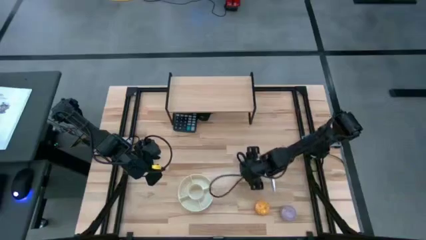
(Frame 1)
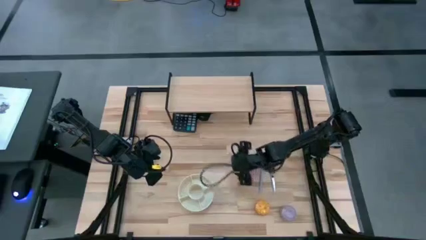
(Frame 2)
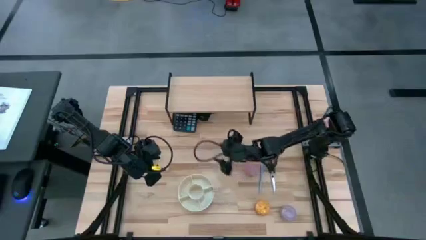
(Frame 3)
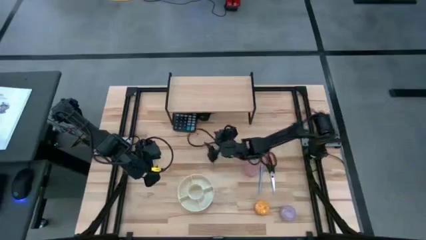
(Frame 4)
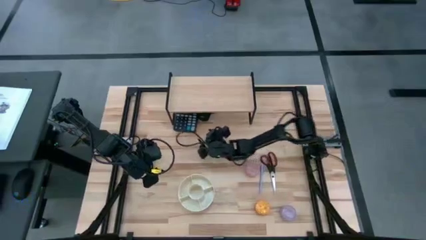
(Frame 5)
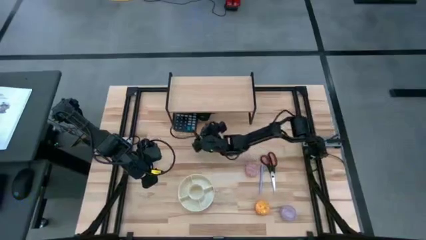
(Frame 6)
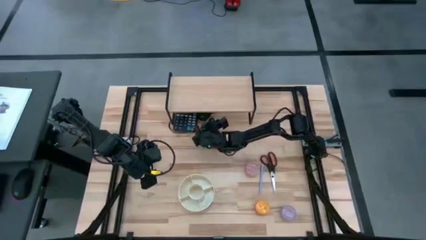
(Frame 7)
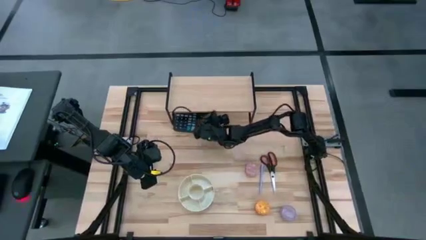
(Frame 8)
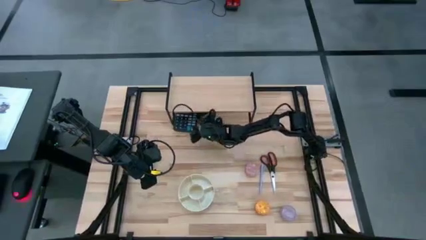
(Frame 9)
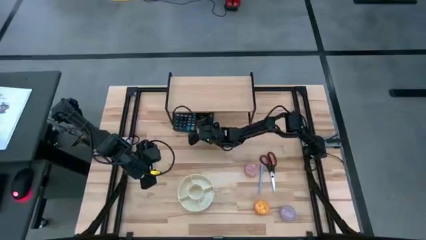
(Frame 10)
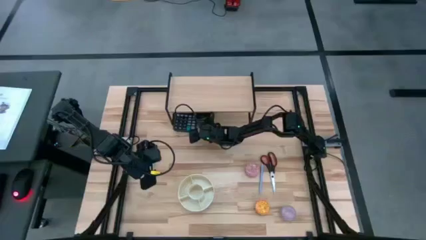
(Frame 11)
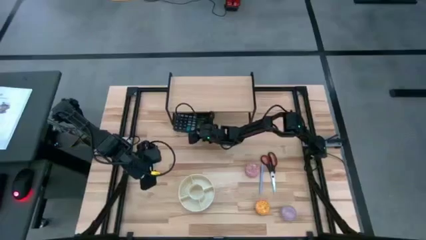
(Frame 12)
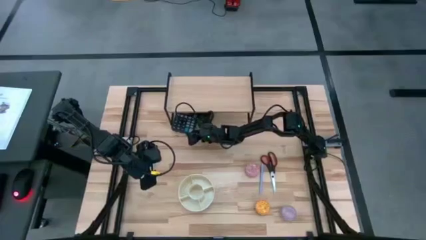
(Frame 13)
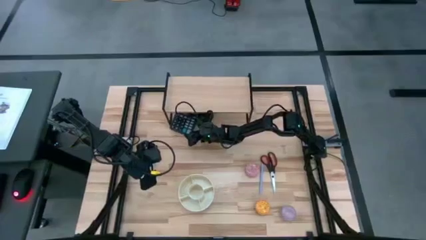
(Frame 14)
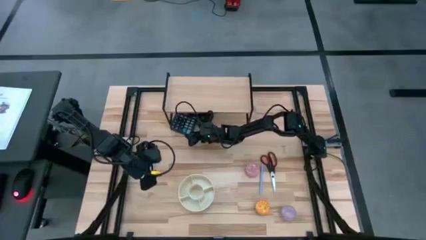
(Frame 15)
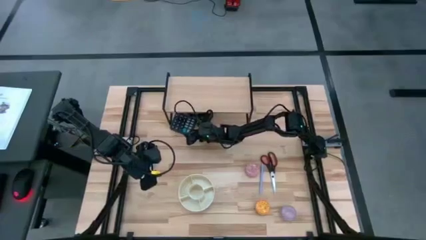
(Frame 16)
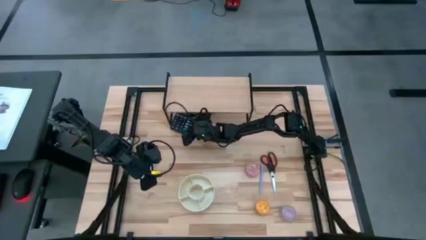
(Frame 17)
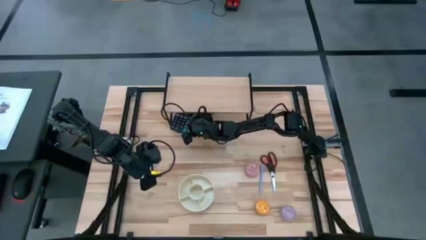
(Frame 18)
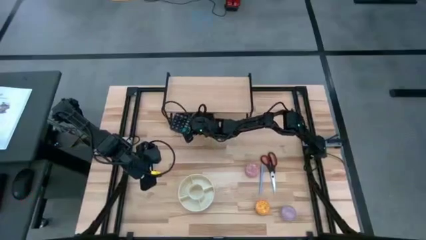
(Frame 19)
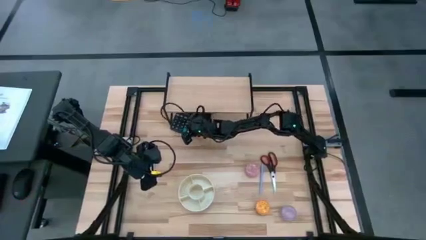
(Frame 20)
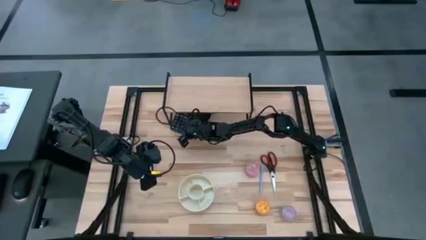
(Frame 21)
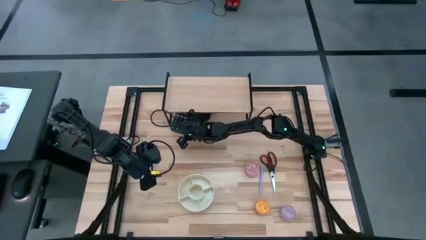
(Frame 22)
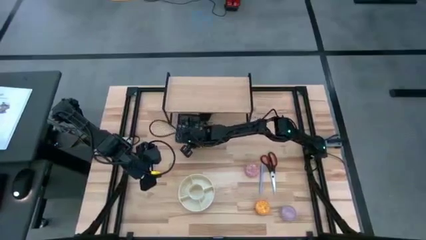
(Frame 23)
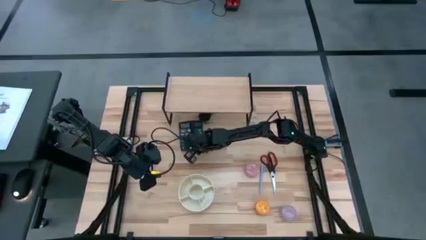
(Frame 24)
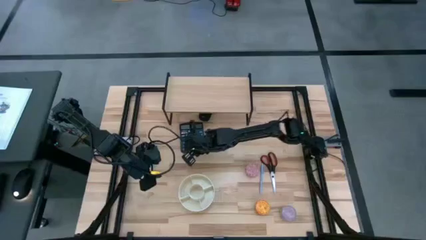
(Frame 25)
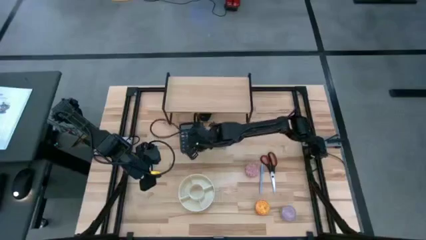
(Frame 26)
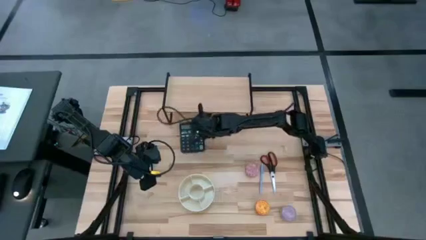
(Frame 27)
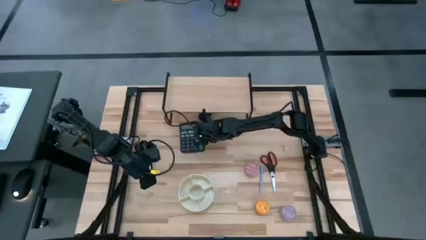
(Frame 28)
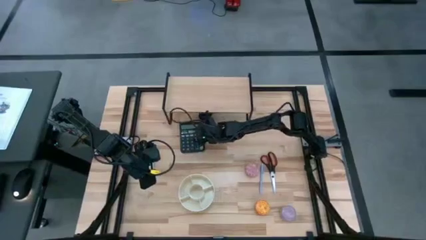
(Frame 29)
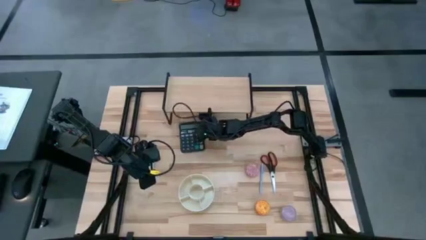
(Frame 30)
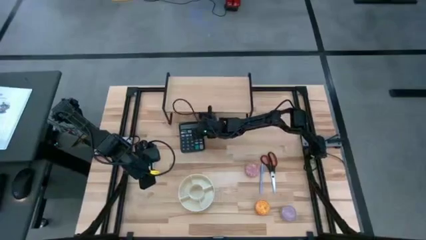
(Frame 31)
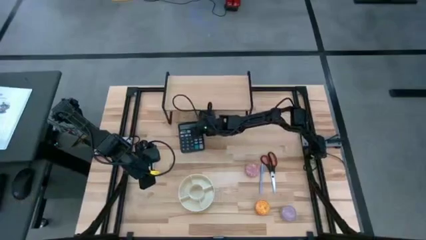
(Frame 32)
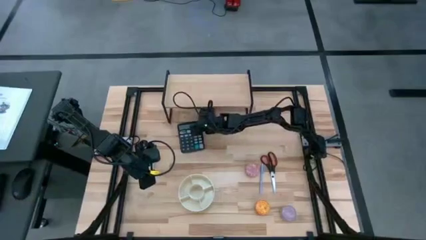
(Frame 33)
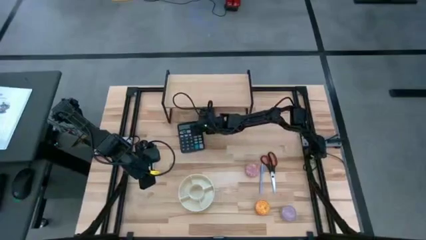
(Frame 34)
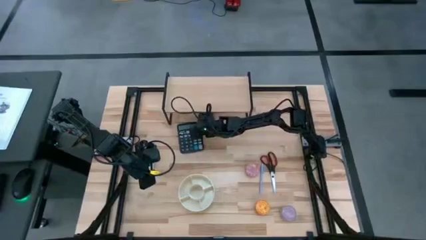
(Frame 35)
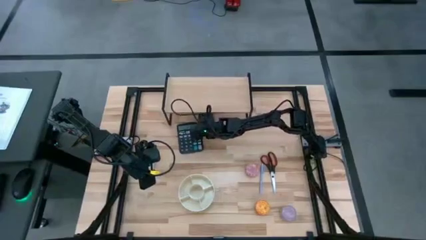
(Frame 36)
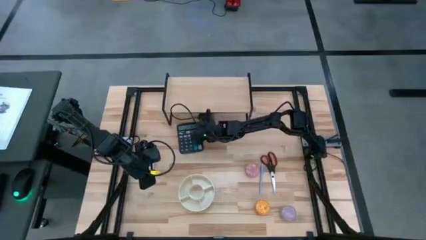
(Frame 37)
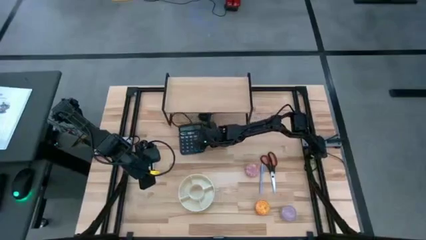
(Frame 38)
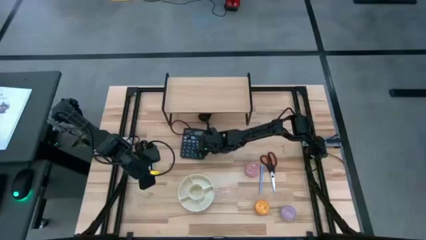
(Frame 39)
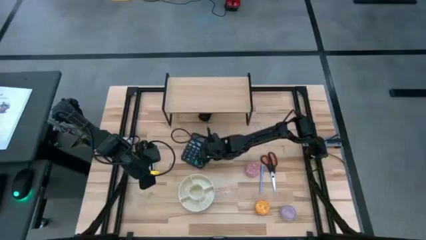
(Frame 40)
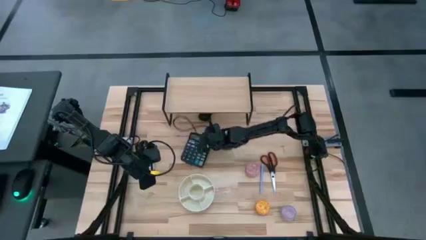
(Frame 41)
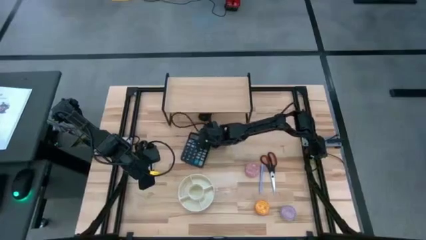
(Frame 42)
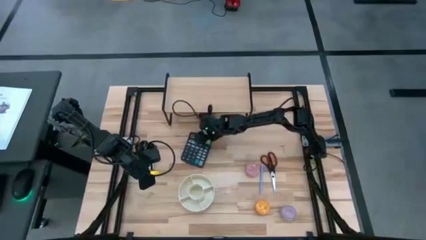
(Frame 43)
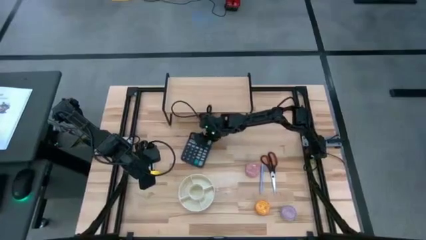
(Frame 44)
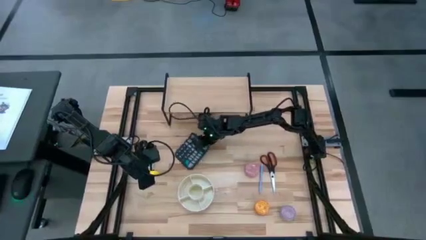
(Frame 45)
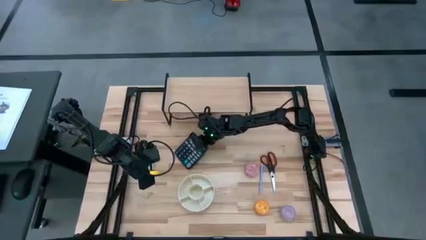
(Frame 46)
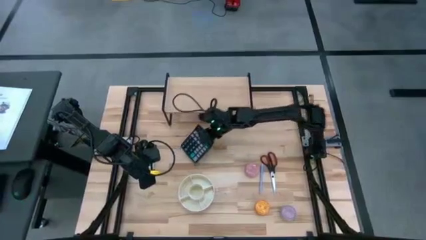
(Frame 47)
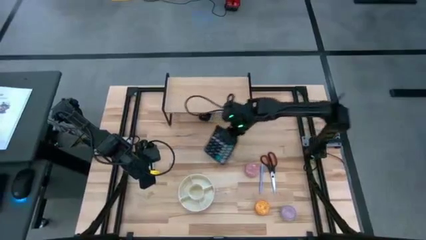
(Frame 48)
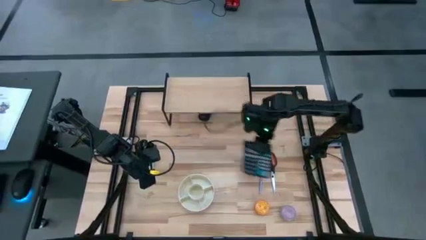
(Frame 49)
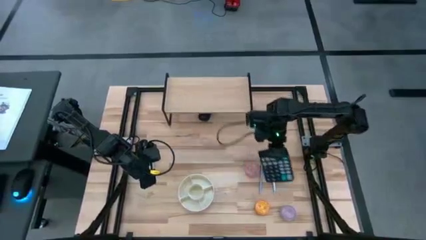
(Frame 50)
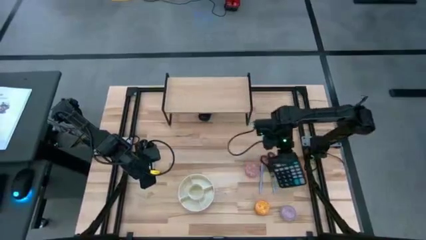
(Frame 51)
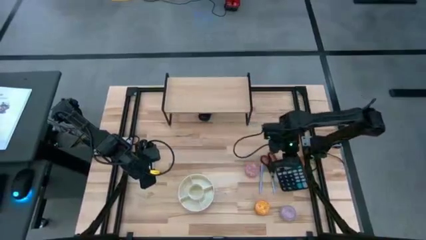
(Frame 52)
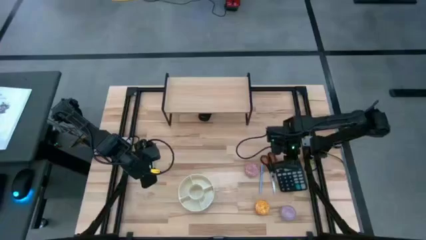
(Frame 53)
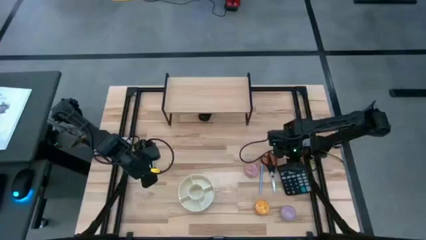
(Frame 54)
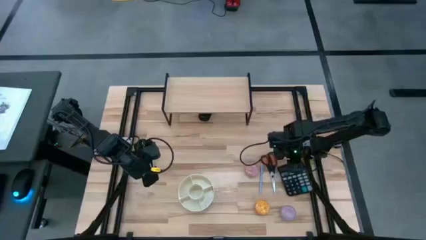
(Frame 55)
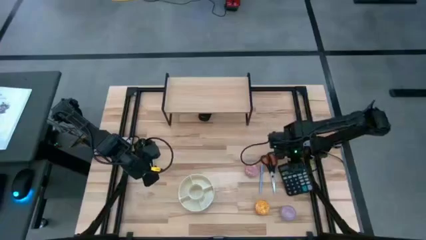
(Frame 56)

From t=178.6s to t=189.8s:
Task: Stock shelves
Remove the black calculator from under the shelf

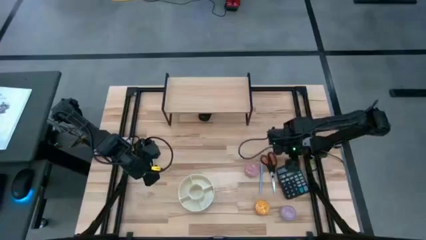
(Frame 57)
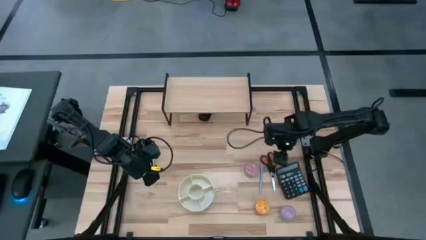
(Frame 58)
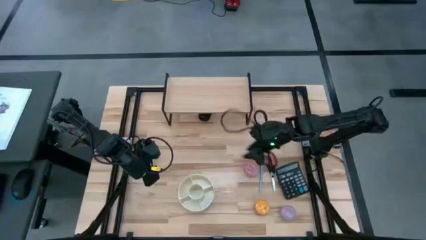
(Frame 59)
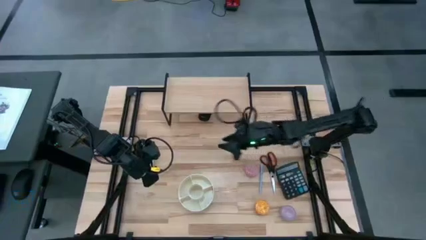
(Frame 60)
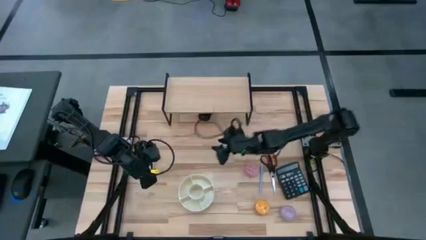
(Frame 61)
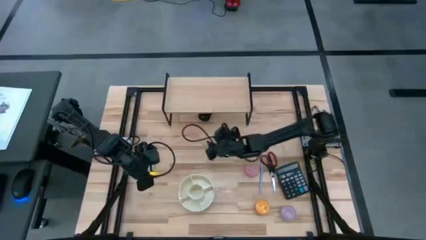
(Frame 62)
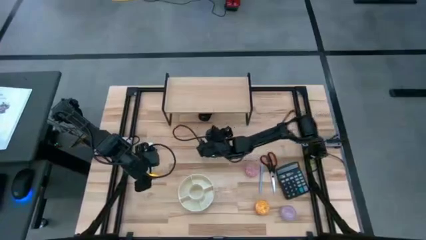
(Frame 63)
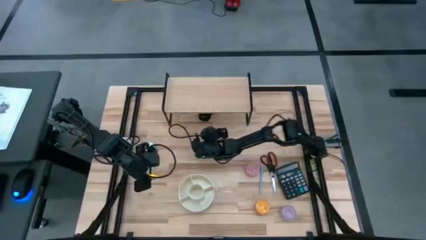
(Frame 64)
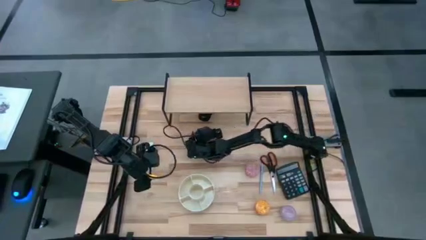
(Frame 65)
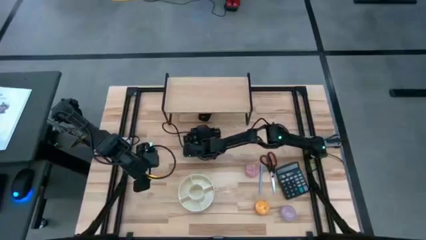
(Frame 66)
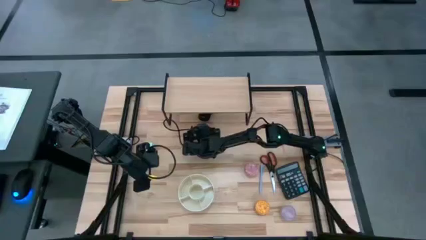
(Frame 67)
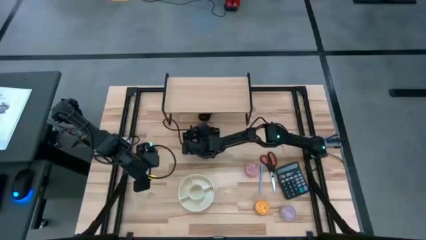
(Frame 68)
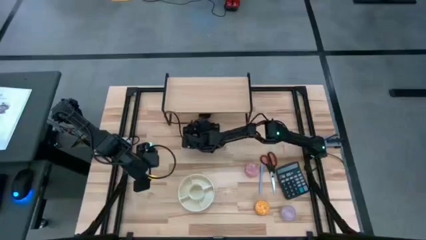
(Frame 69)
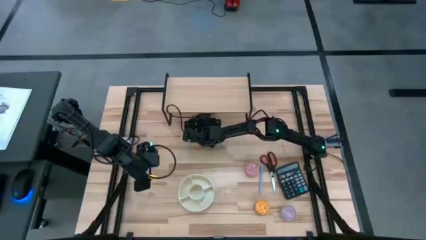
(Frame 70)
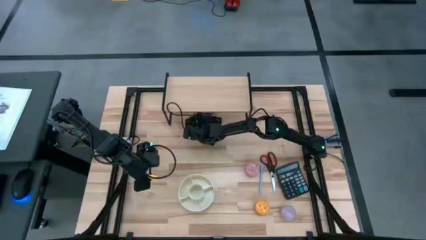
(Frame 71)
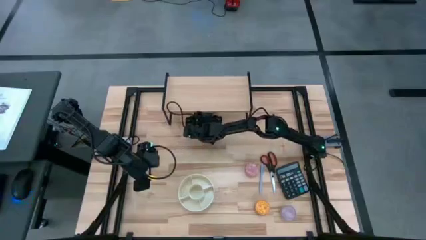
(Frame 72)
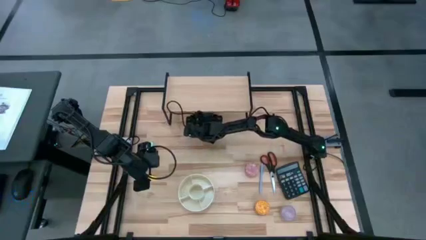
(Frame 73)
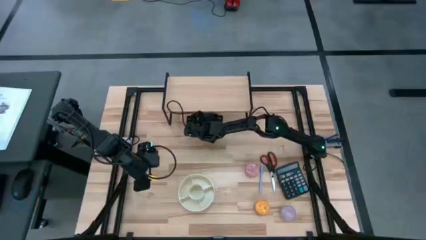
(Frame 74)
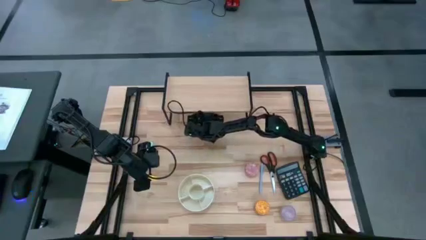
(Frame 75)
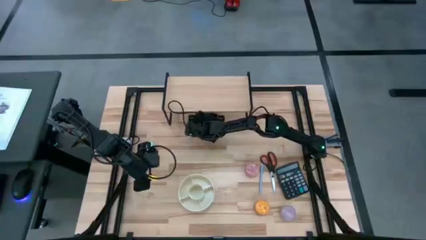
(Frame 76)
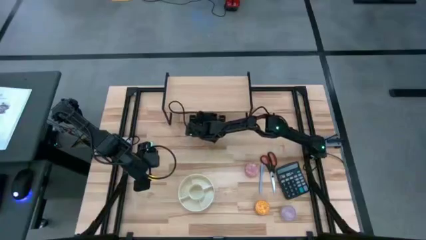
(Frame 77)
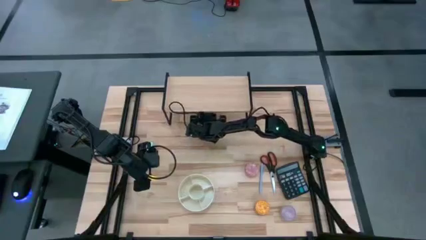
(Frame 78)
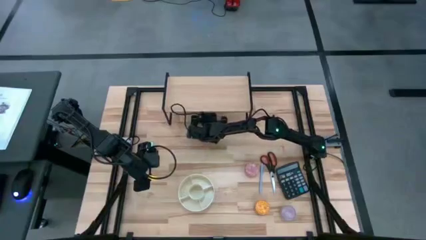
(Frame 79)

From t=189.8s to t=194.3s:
Remove the black mouse from under the shelf
